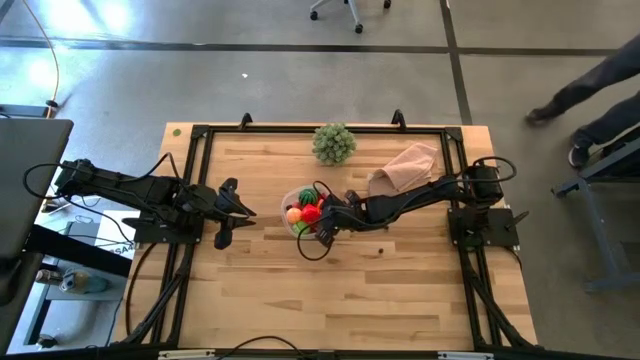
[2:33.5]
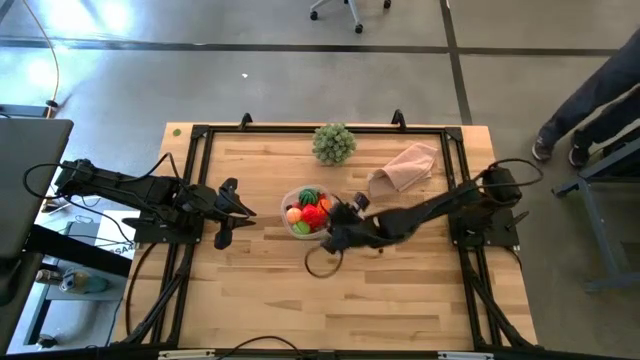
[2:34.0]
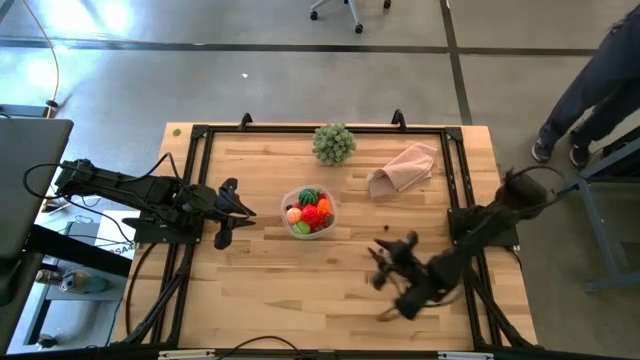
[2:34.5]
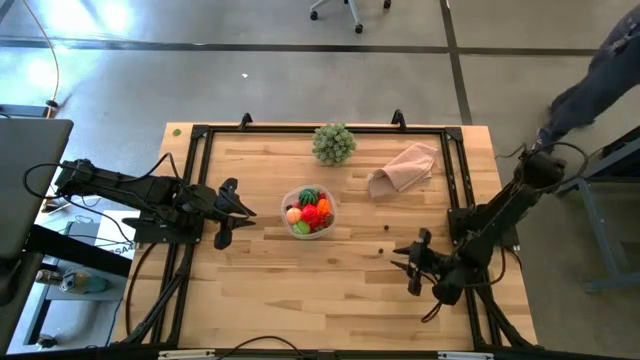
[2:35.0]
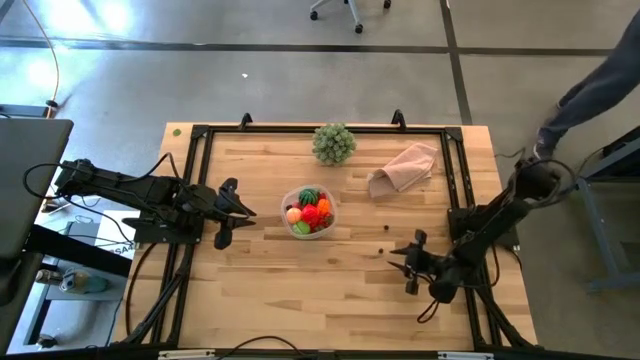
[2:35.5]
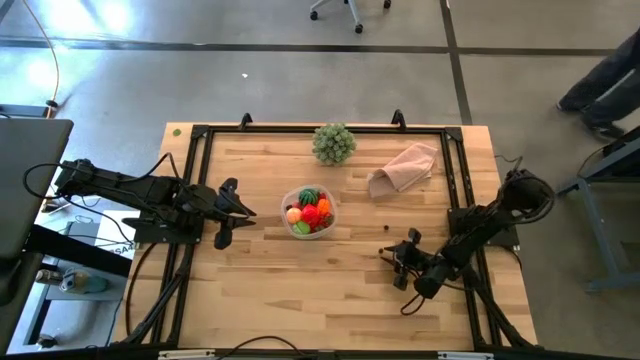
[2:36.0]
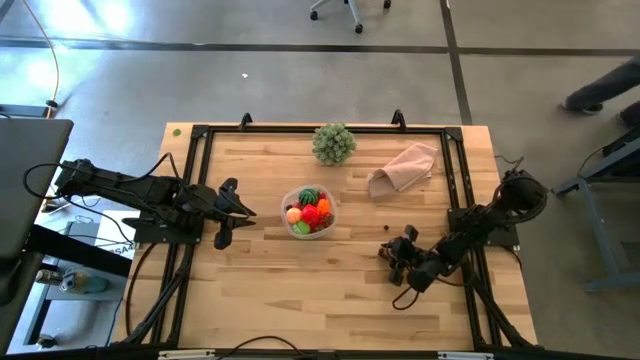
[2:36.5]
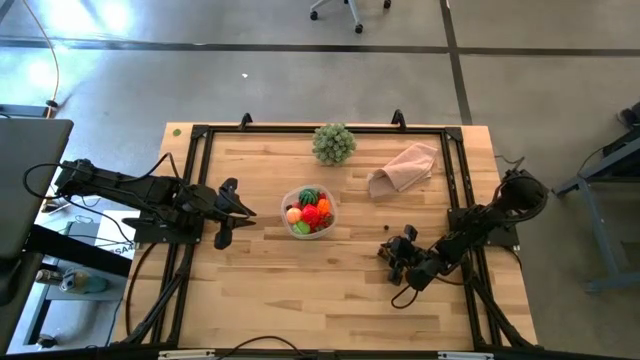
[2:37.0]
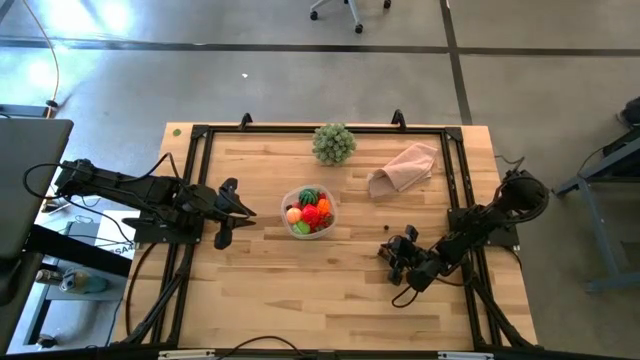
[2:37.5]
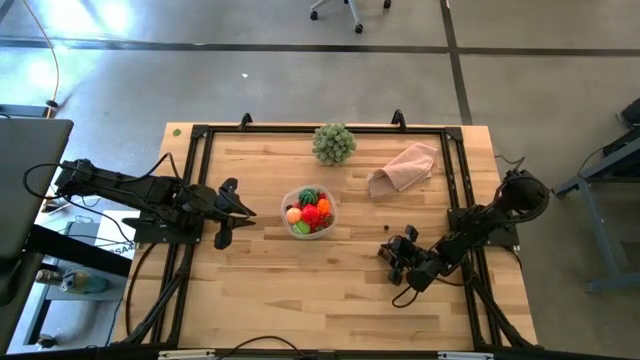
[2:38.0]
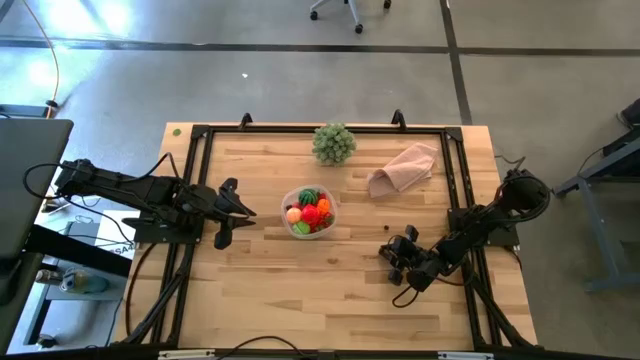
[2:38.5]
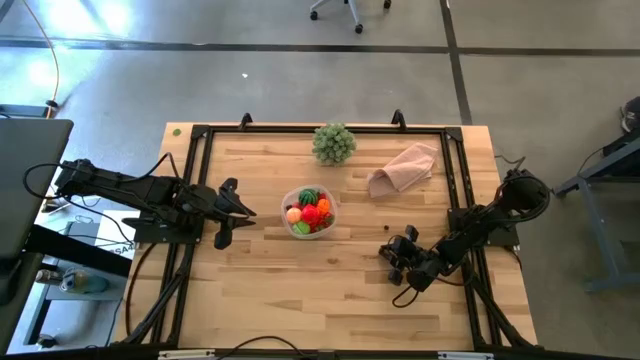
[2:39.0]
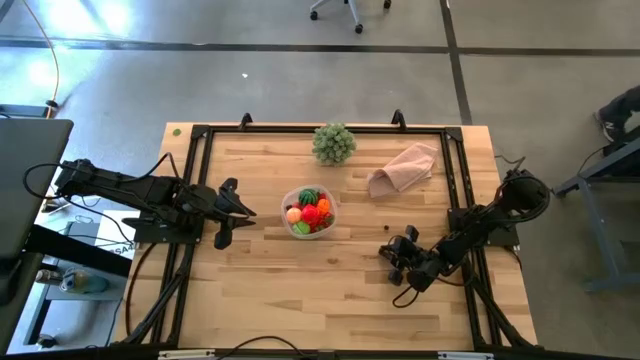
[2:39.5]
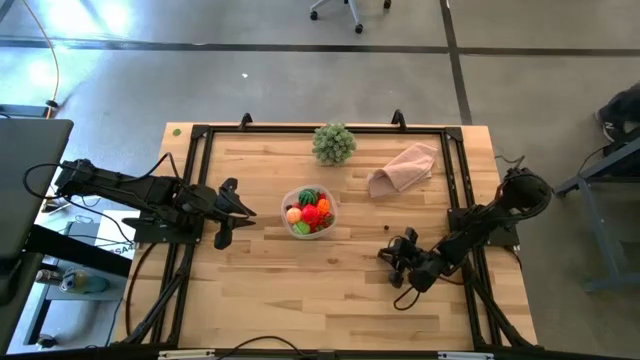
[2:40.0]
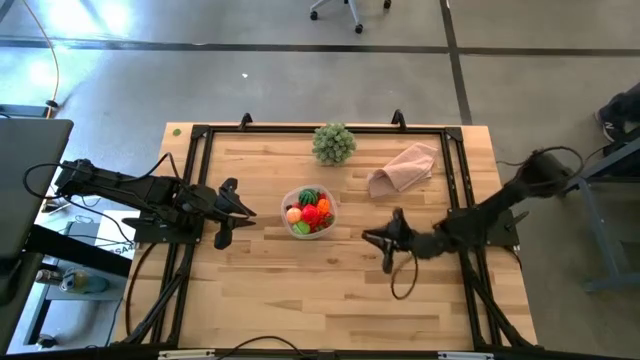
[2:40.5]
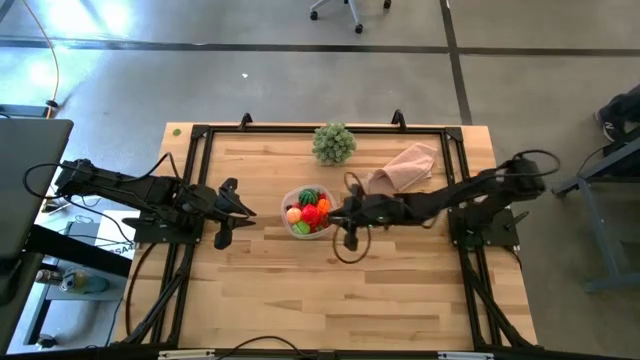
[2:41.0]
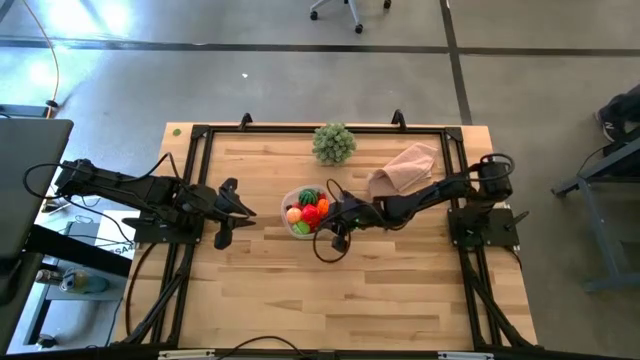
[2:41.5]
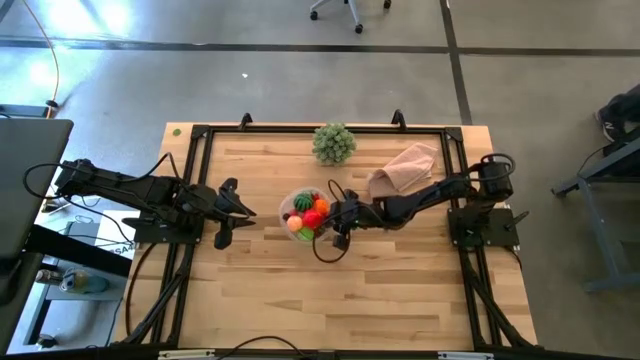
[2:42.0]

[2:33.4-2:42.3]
Task: Pick and placing Produce into tupperware
Put the blueberry into the transparent bin

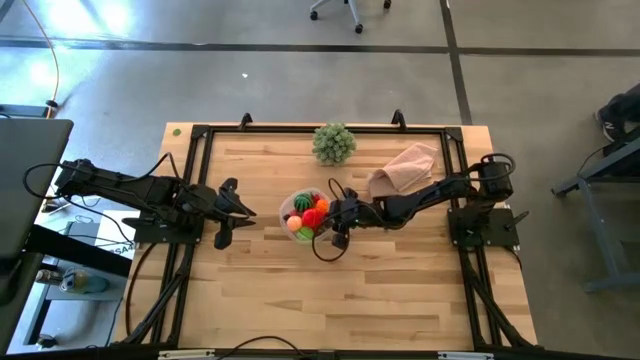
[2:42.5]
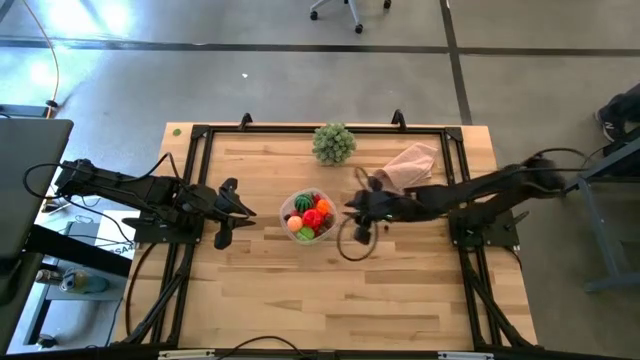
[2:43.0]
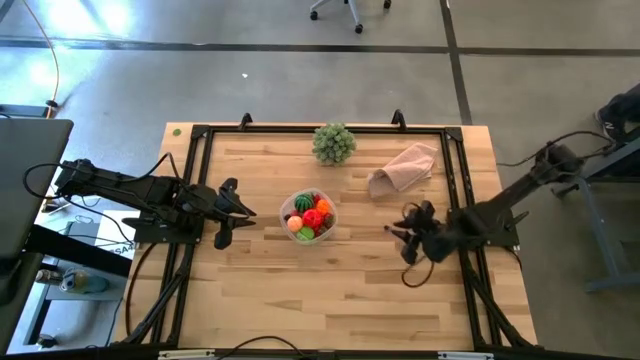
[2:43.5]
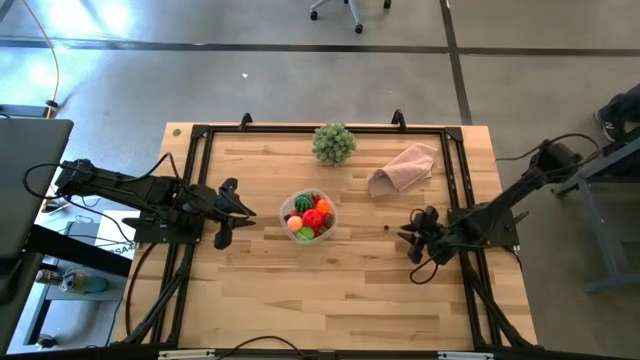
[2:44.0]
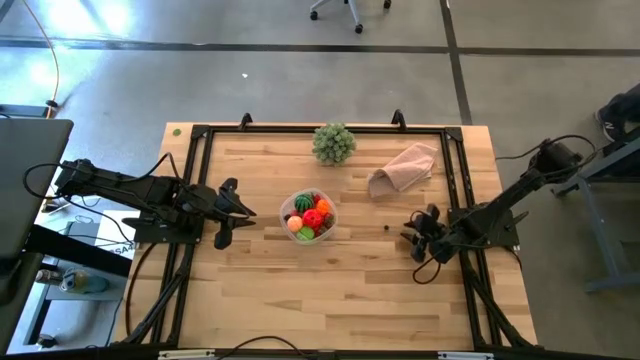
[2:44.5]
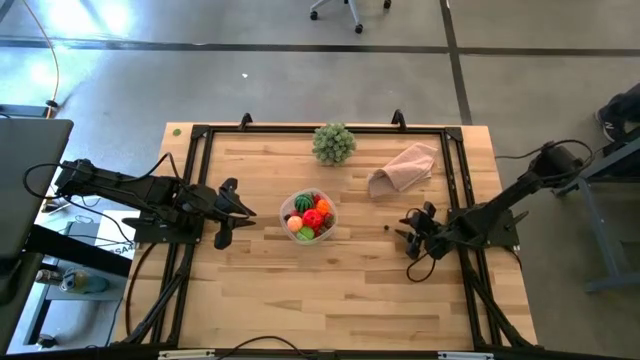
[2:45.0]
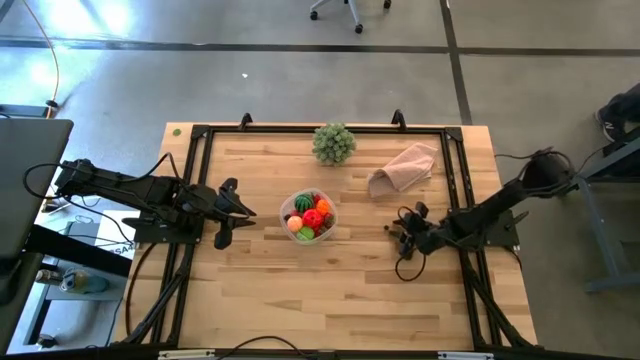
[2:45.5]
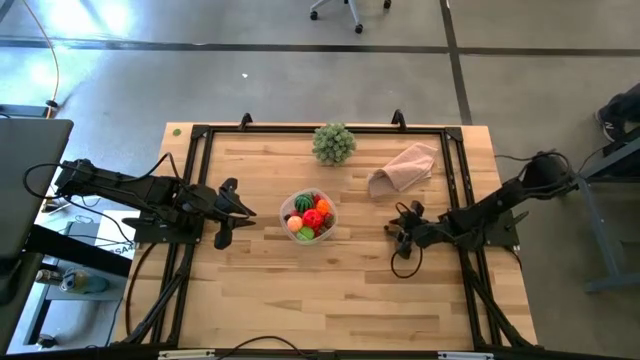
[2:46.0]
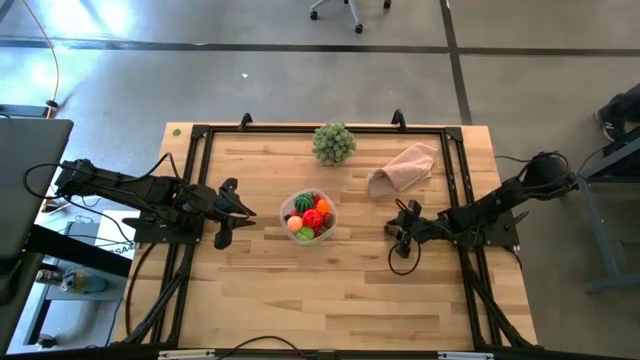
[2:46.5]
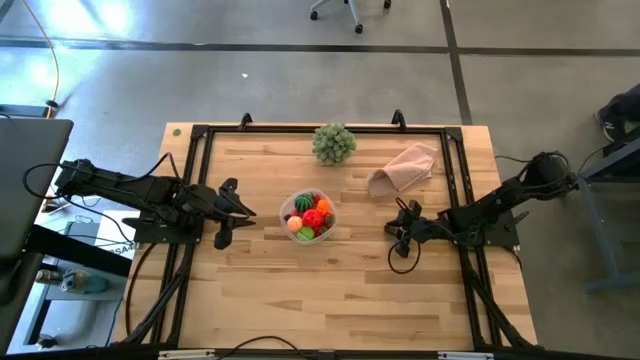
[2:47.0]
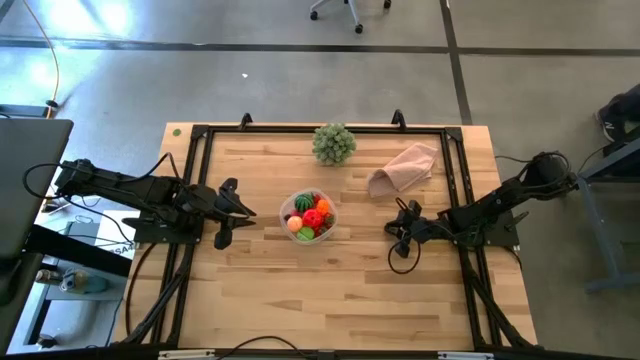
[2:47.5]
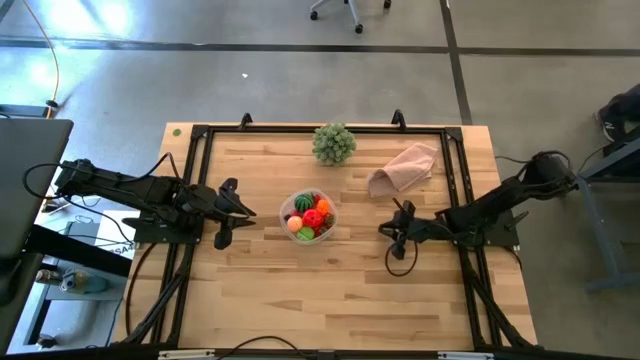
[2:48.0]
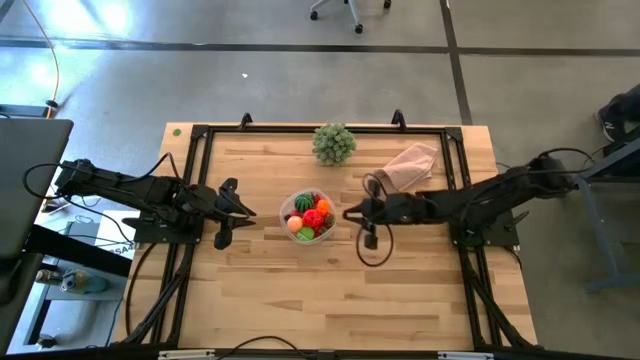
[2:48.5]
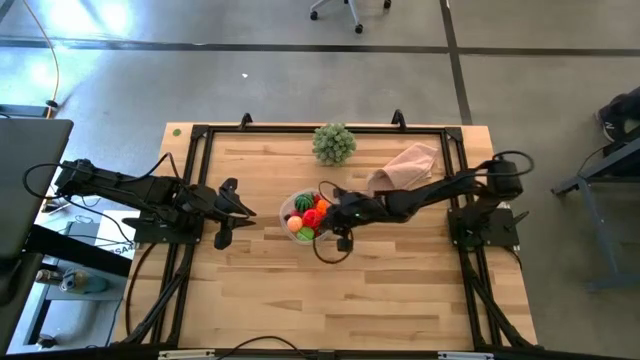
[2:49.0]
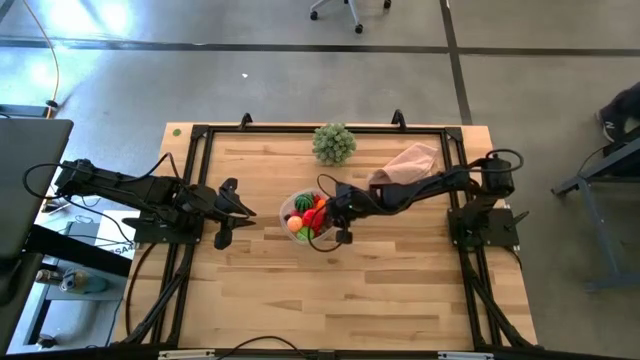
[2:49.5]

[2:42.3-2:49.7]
Put the blueberry into the transparent bin

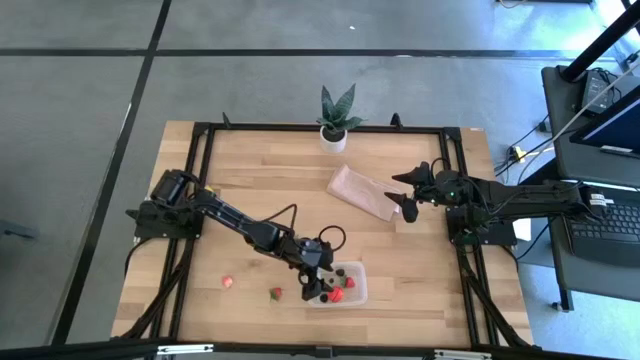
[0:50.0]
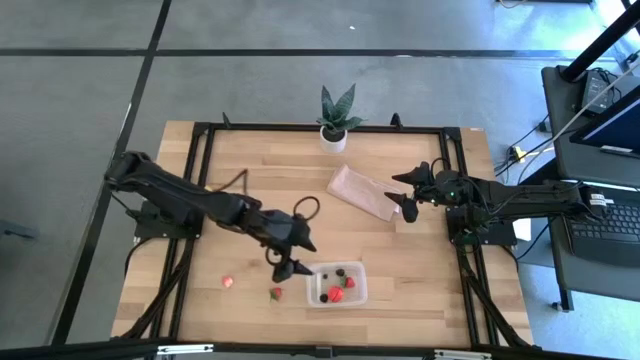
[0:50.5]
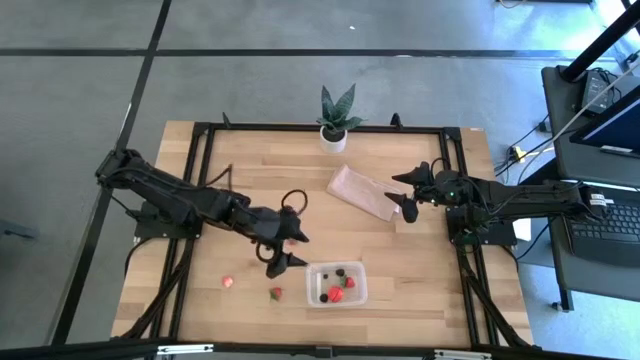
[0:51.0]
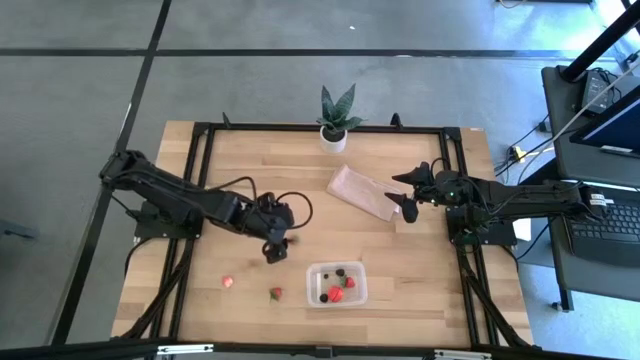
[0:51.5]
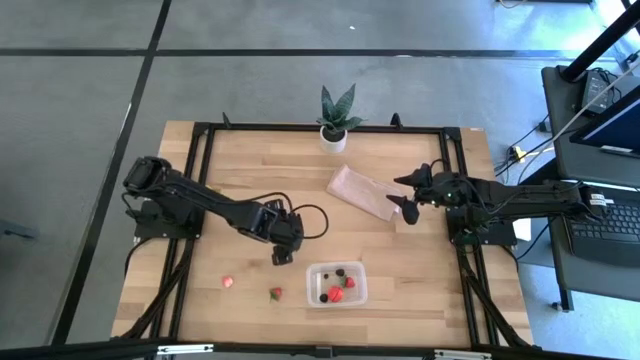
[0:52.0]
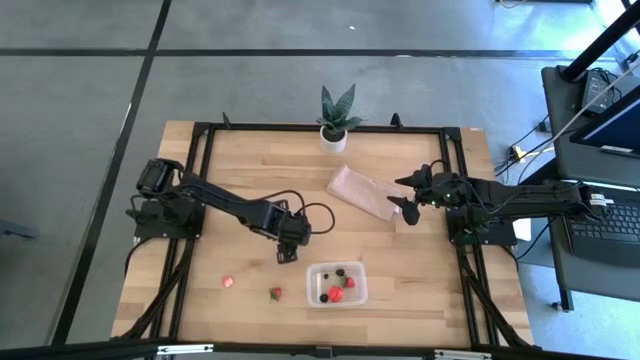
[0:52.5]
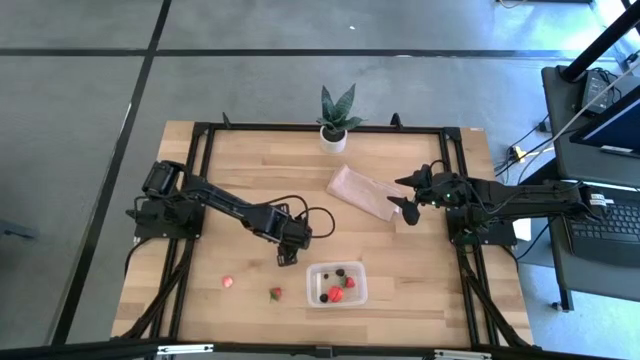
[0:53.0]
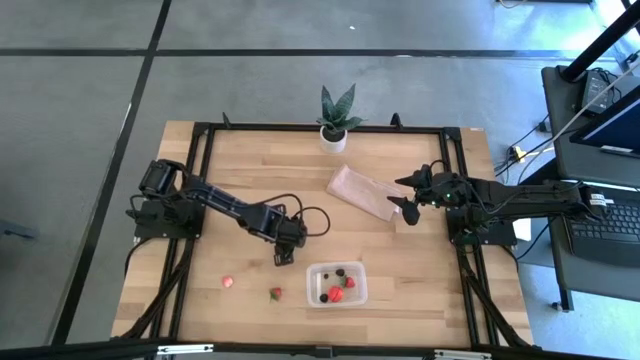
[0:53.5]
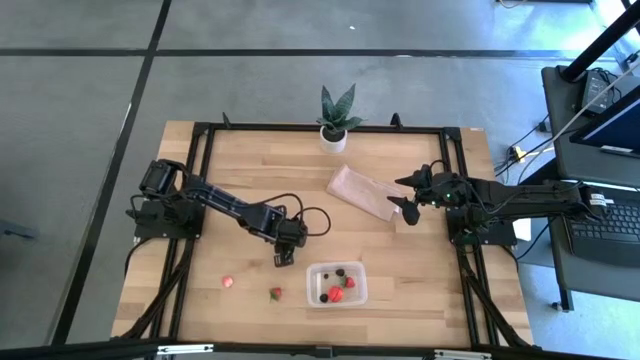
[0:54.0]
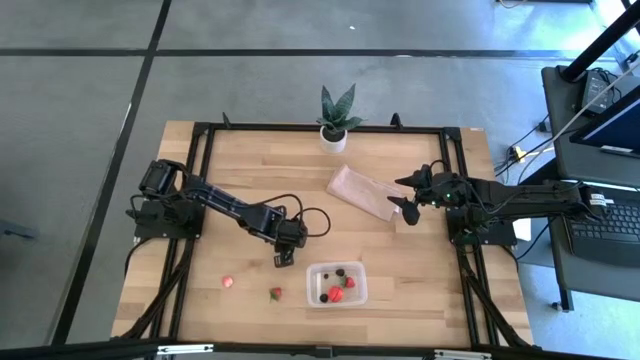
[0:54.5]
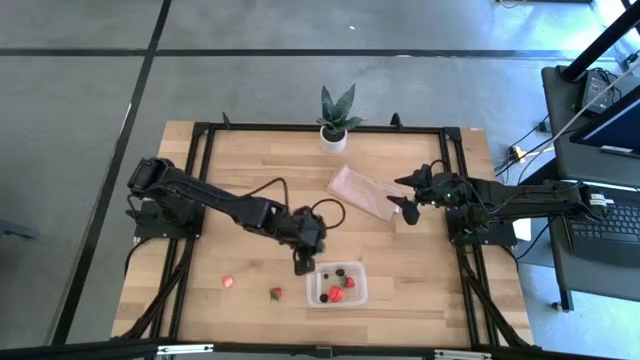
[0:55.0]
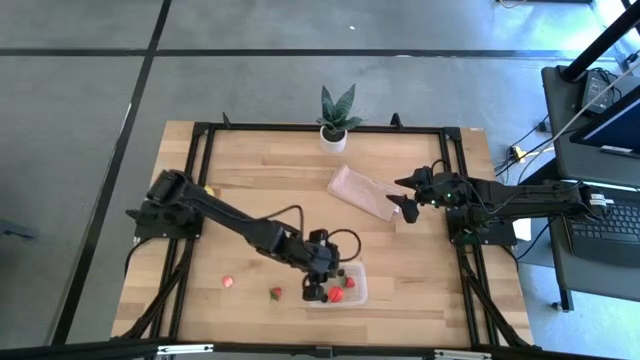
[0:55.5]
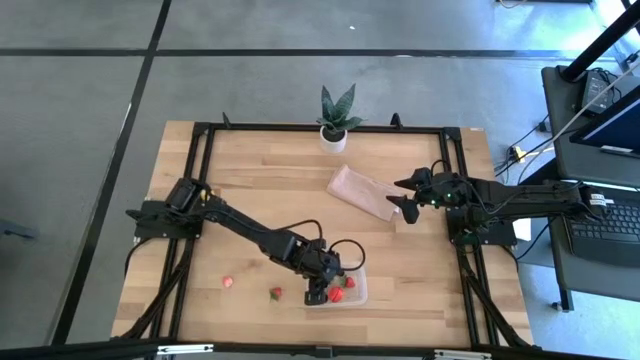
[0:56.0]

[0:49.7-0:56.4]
Task: Pick and placing Produce into tupperware
Put the red strawberry in the bin
